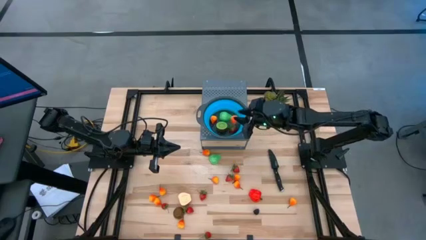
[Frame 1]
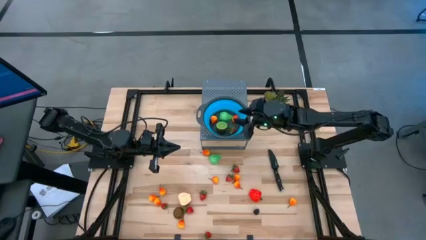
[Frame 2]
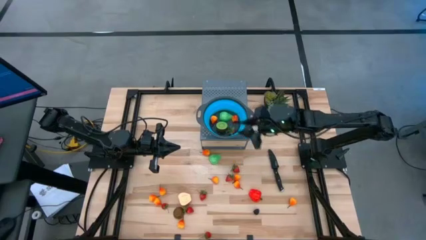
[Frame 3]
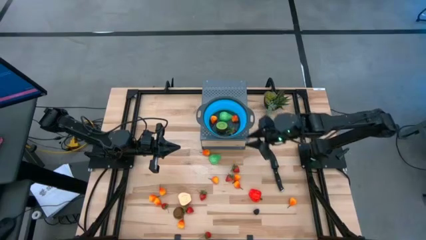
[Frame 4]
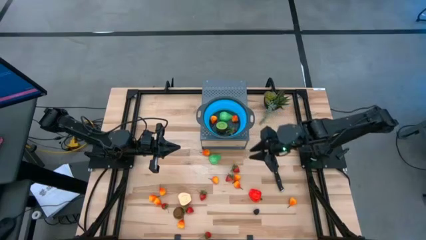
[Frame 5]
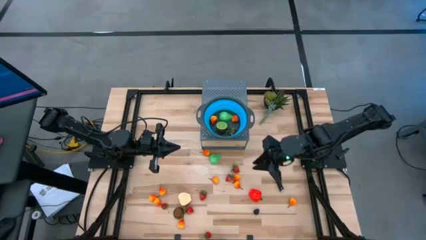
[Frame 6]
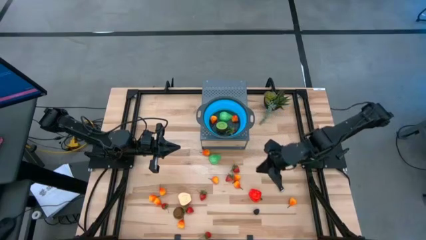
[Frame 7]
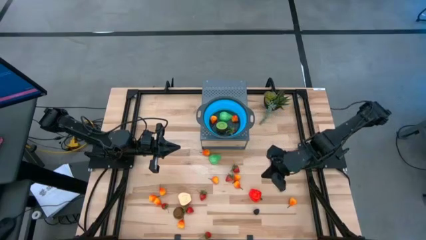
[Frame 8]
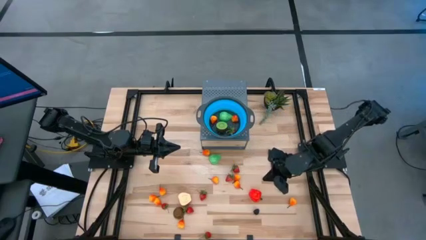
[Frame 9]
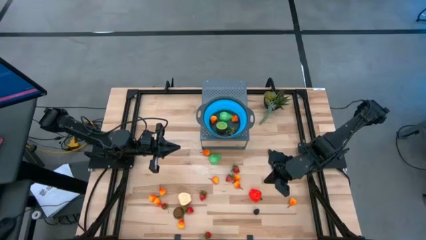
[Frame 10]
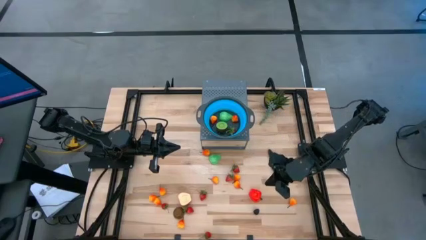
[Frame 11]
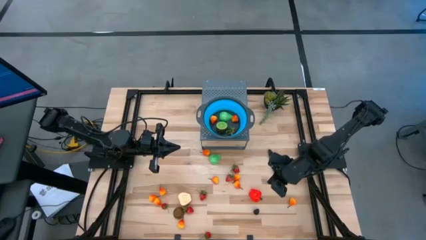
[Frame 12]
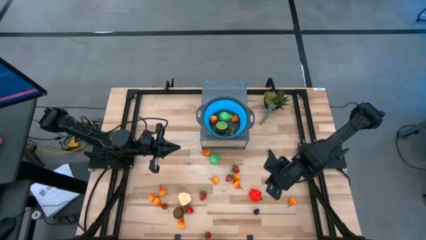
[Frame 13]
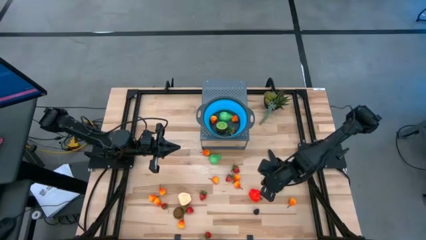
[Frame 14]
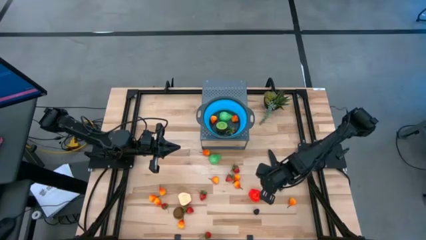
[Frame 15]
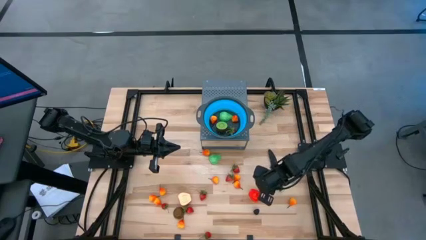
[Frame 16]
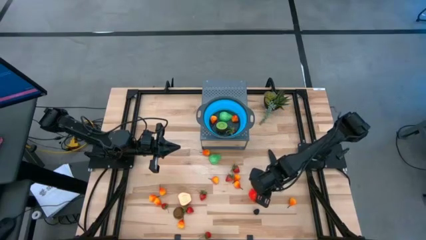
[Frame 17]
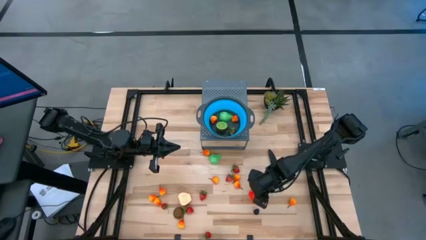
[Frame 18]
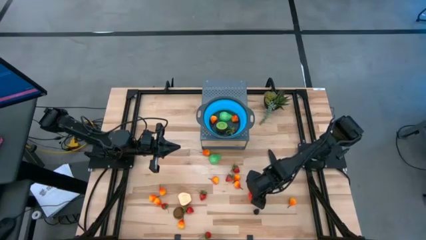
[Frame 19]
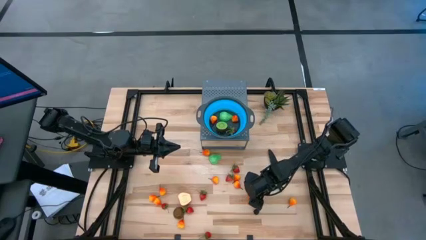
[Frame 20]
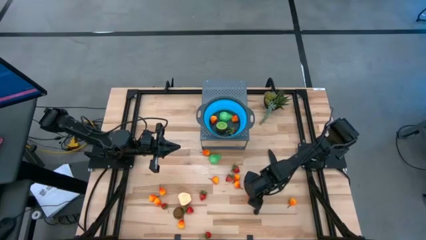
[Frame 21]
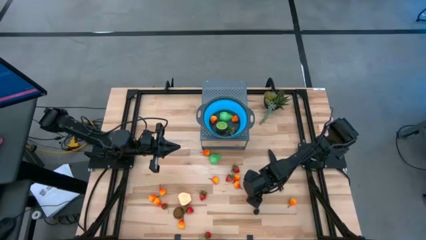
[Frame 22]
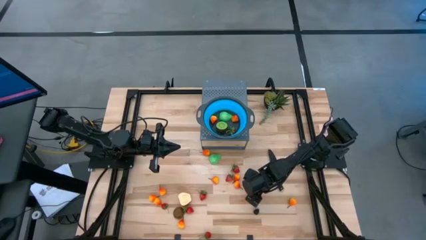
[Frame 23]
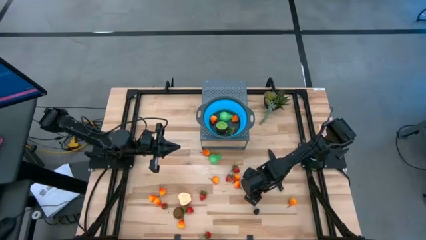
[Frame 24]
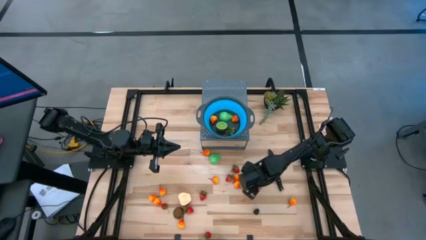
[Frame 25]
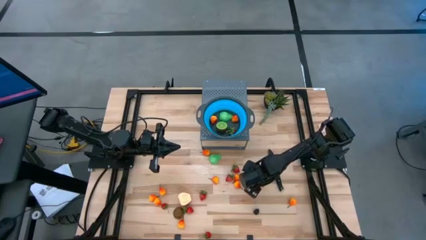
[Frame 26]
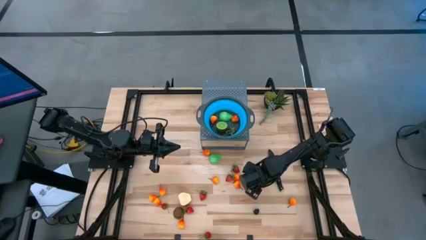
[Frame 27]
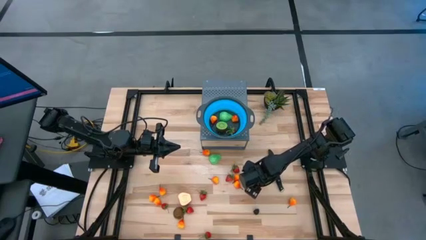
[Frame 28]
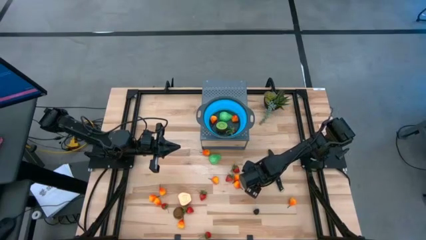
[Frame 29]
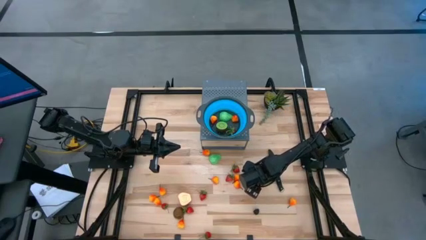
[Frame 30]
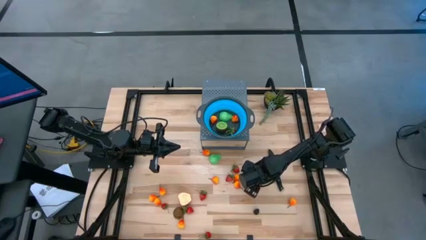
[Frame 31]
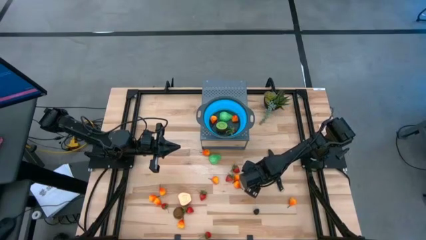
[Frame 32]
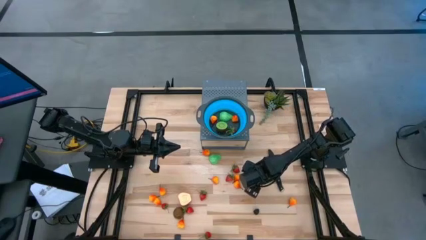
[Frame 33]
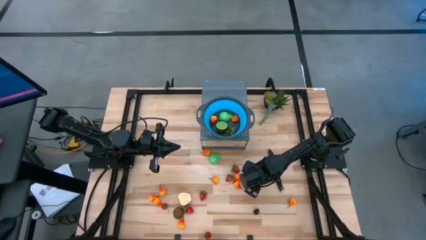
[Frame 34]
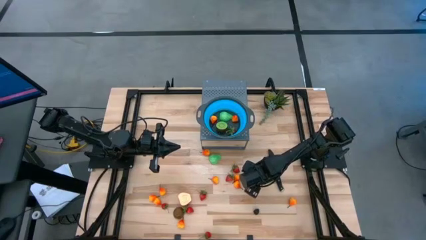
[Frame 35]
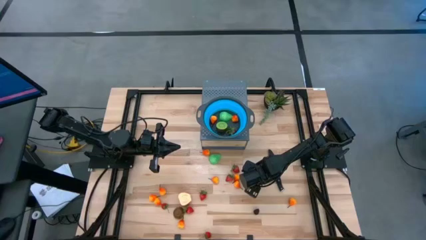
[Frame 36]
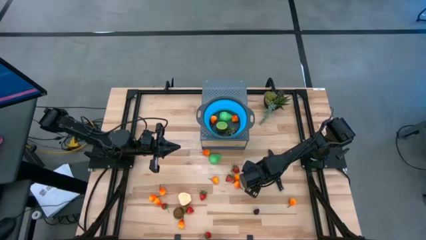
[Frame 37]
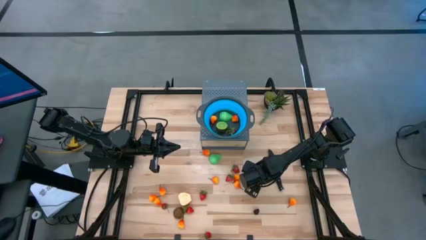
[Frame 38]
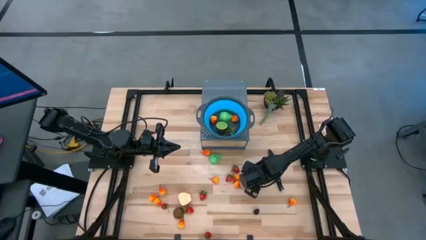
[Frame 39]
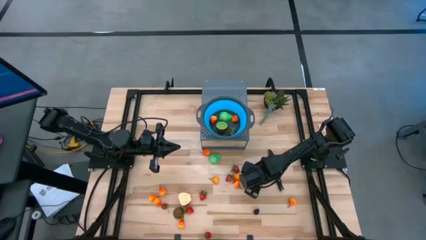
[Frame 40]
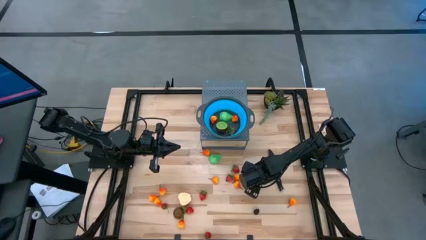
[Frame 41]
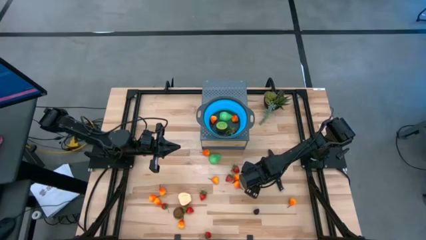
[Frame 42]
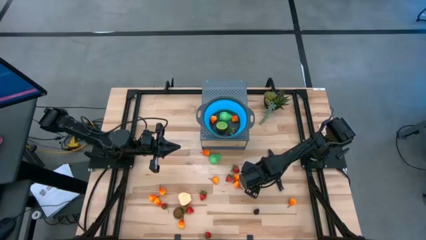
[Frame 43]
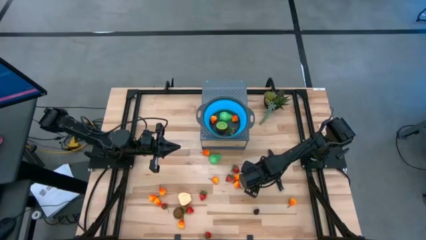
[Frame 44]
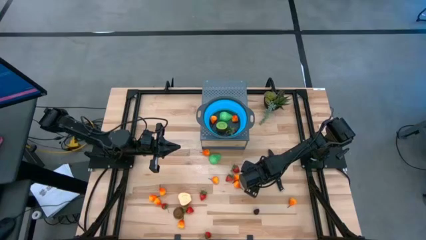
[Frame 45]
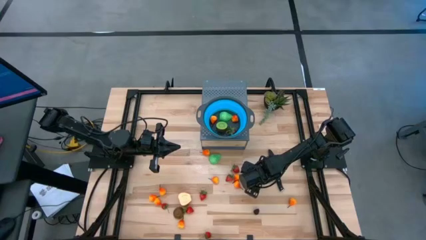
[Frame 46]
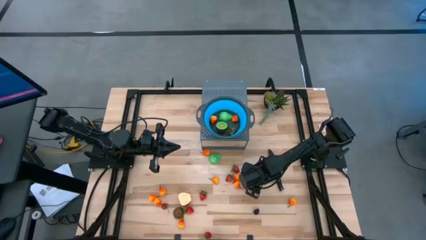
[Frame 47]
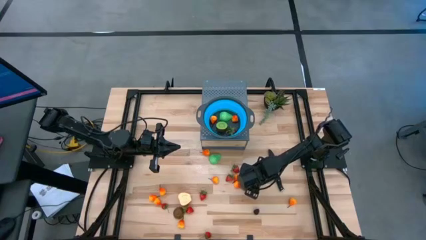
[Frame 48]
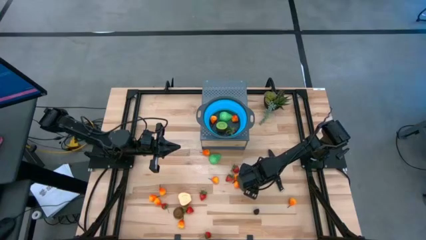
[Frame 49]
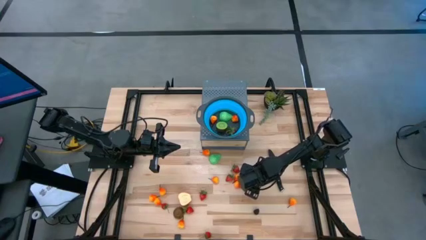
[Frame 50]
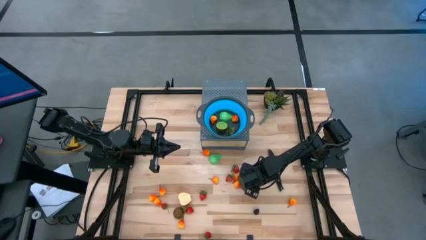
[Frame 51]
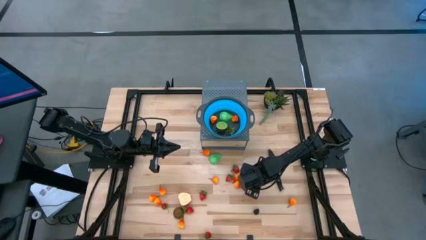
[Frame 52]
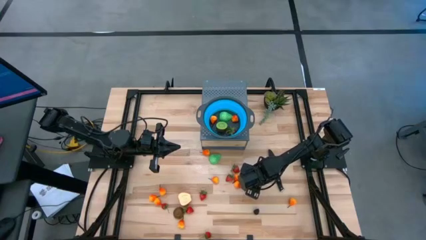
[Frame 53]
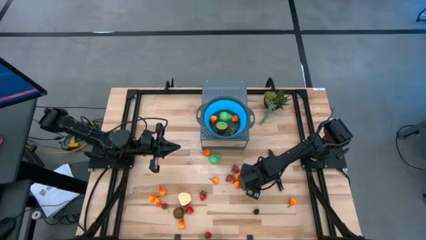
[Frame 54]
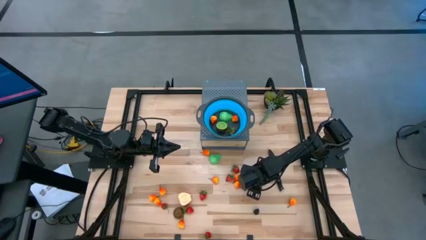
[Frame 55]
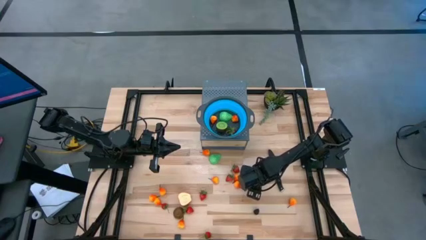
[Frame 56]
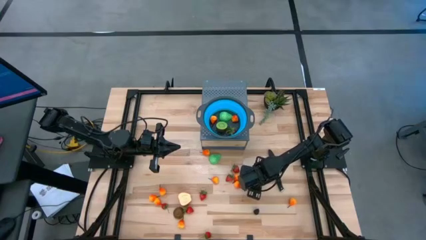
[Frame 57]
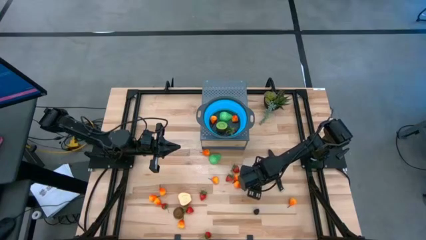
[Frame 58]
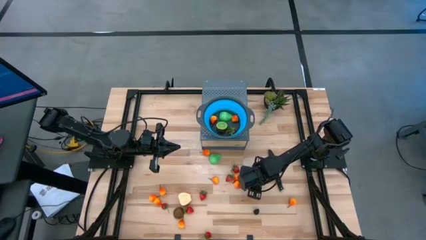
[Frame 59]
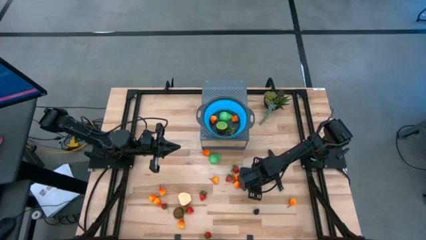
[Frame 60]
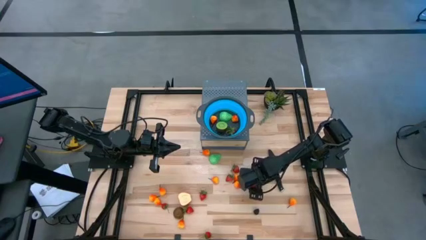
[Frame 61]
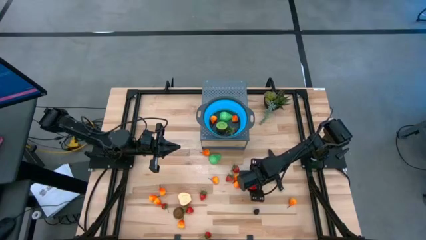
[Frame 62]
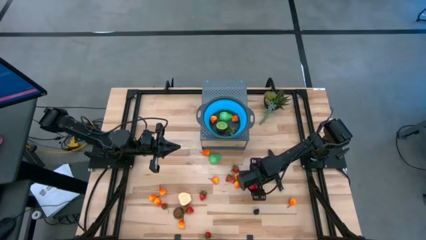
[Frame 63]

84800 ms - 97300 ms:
Task: Pick & Place Fruit
Put the right sliced apple into the strainer bowl

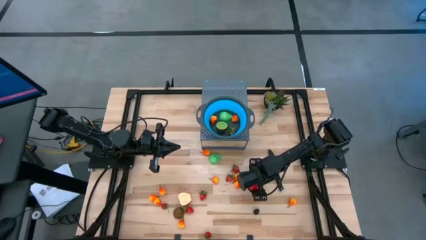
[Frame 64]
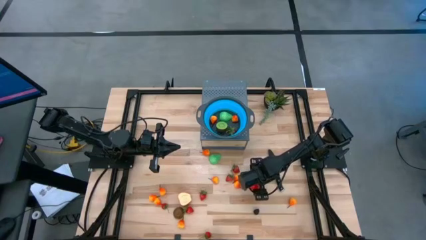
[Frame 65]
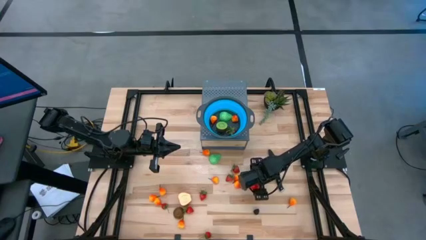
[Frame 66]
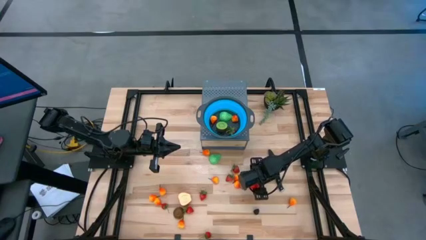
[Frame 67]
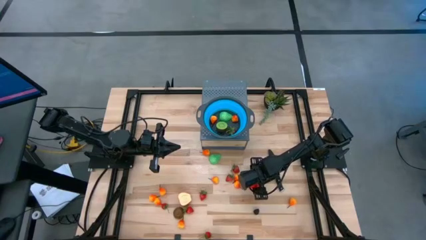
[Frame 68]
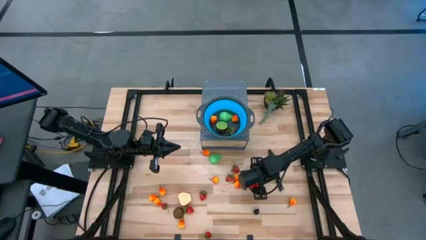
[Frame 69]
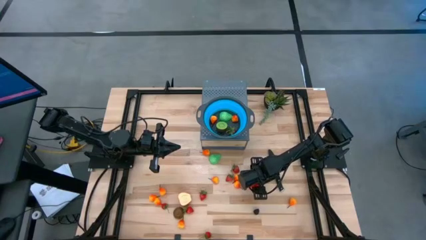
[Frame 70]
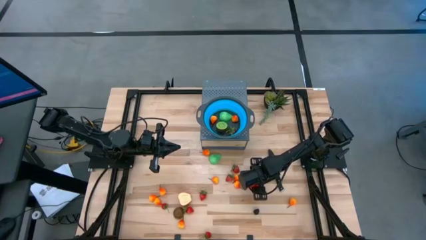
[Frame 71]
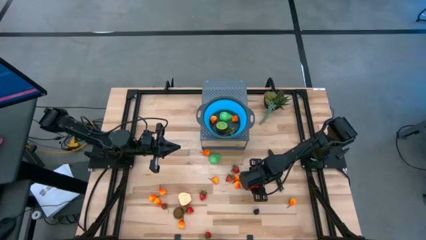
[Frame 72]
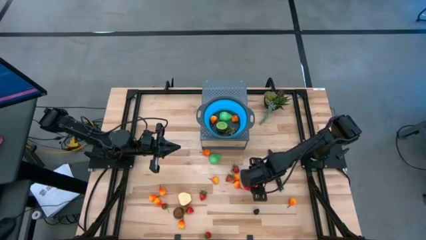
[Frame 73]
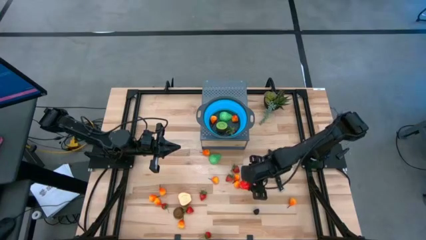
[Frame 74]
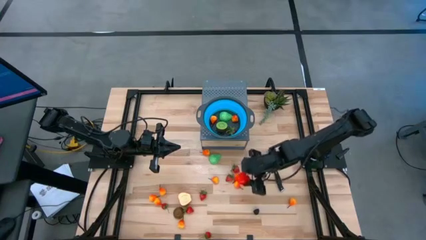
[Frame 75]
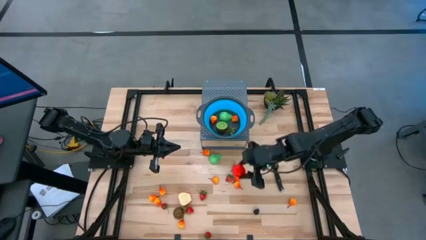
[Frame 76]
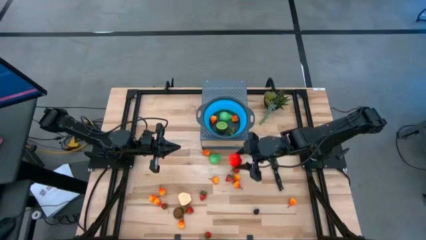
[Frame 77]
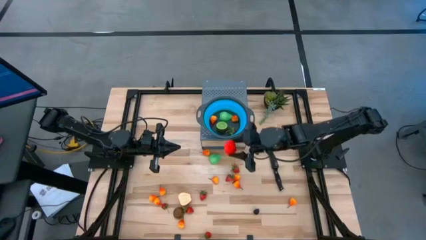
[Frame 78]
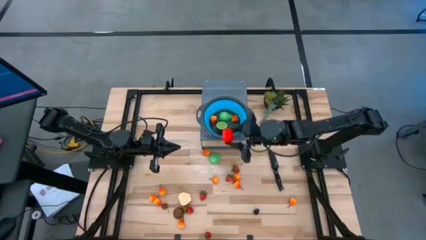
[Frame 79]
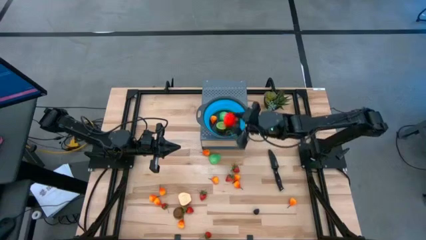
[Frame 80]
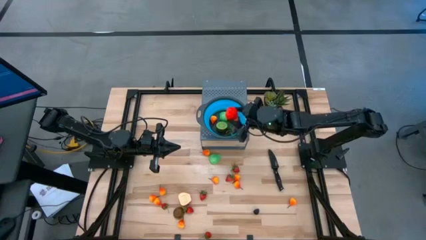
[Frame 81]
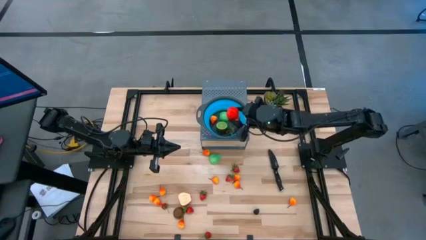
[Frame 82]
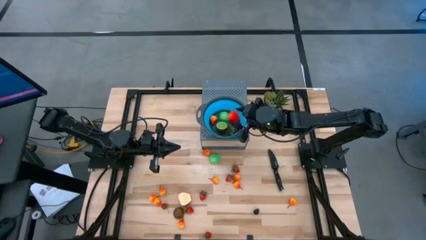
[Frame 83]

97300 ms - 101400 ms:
Put the right sliced apple into the strainer bowl
